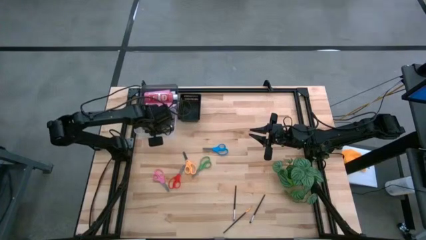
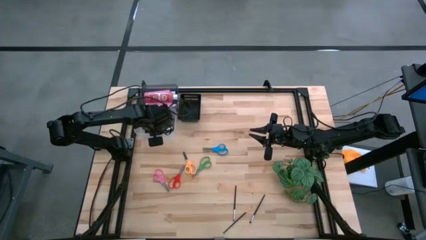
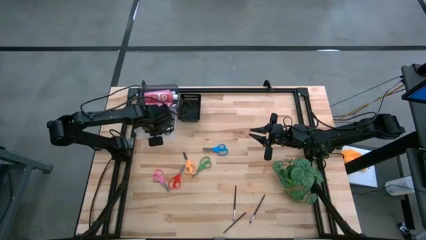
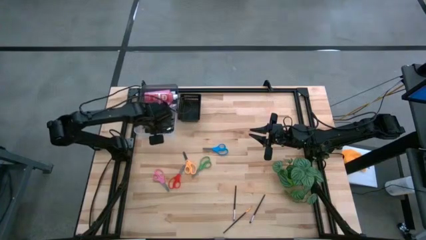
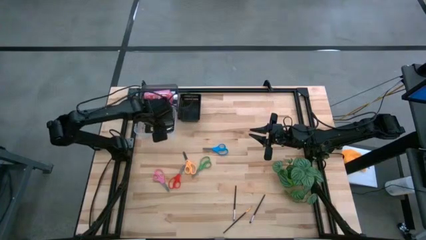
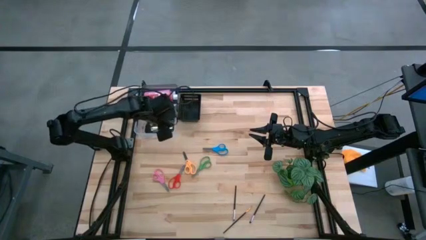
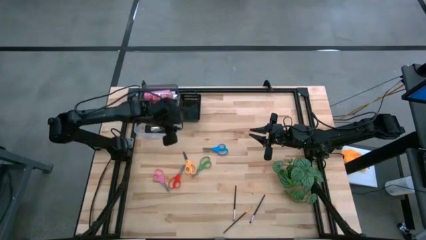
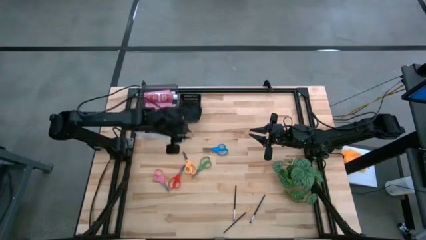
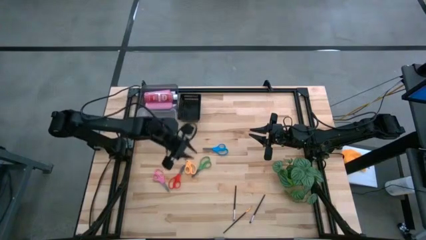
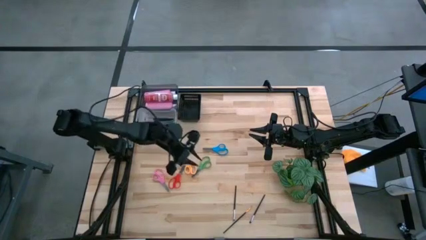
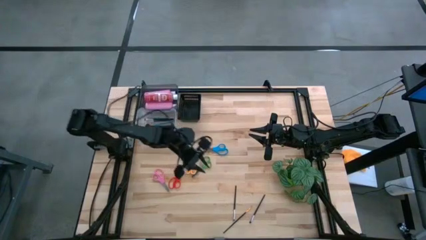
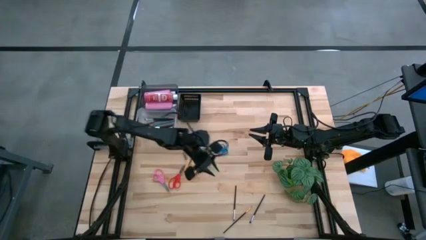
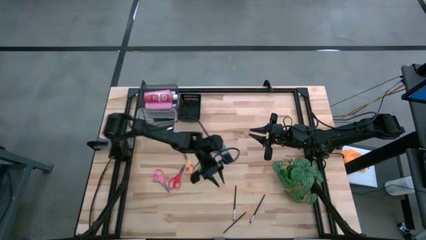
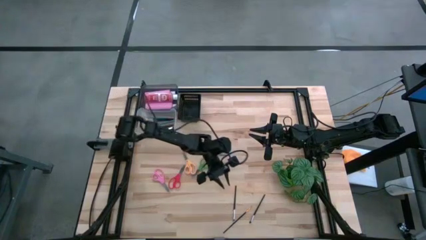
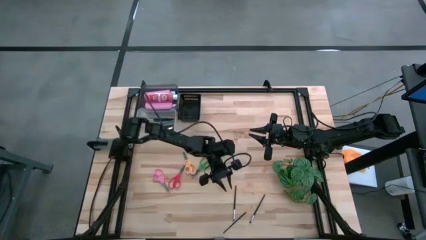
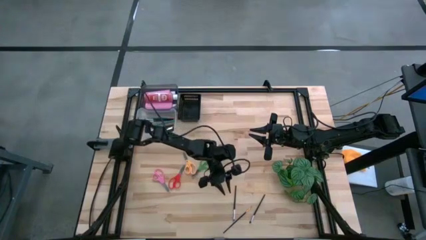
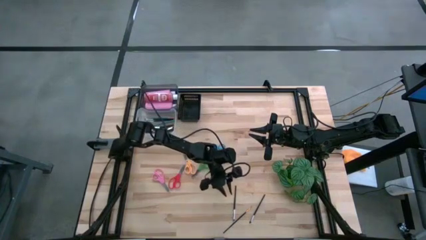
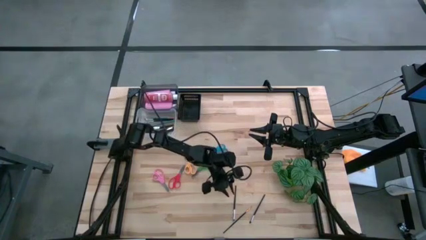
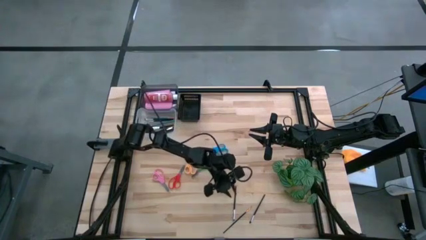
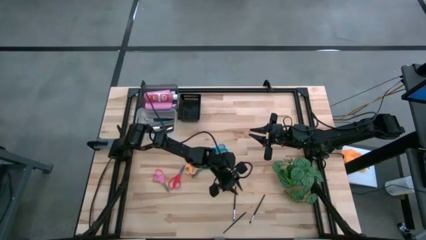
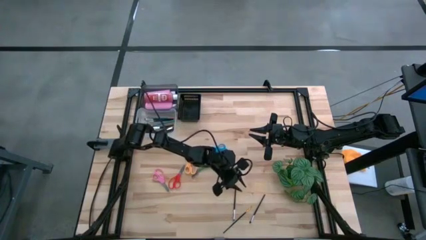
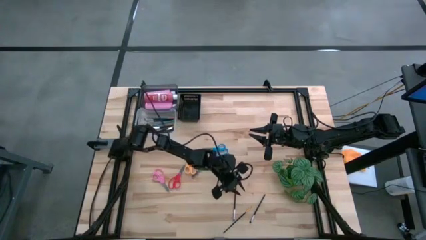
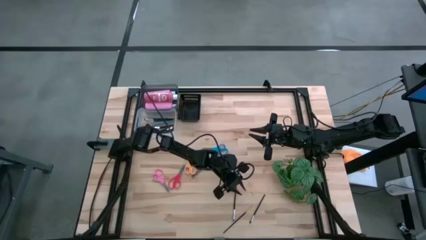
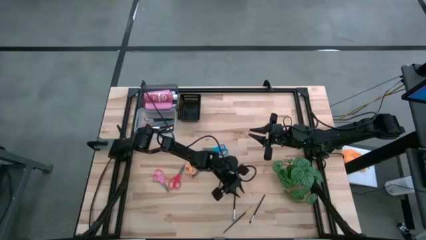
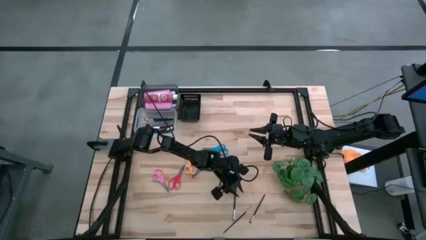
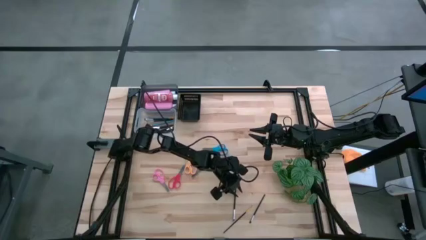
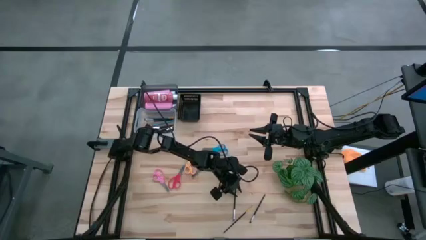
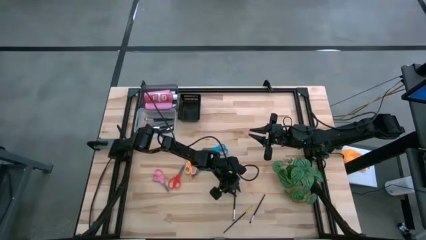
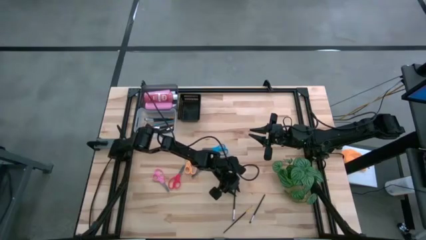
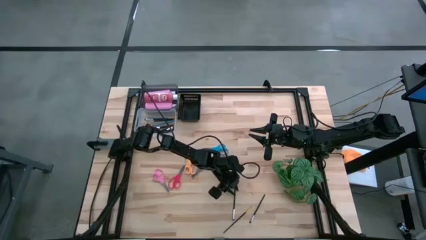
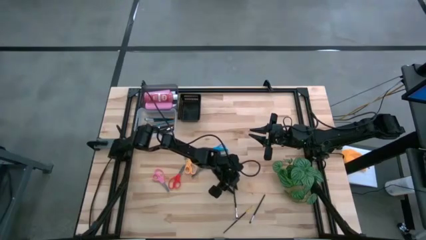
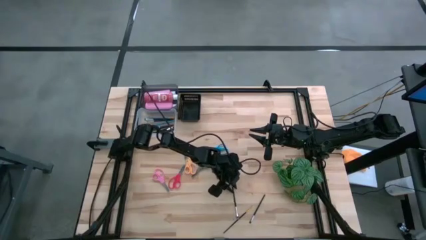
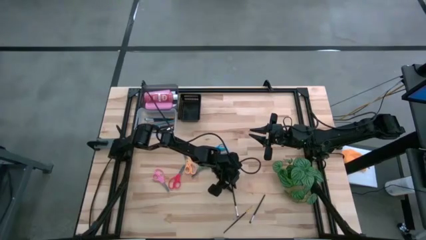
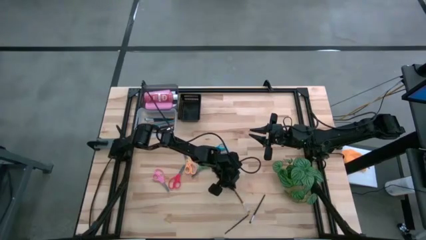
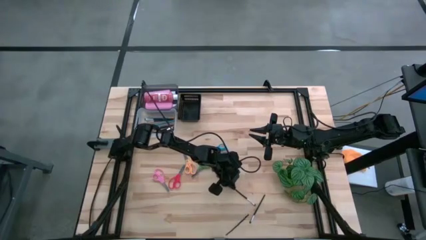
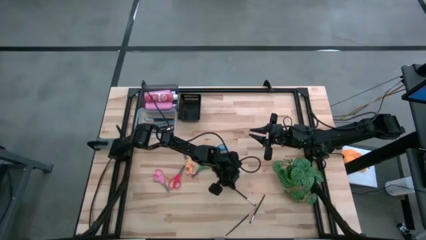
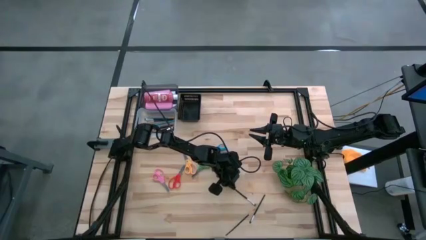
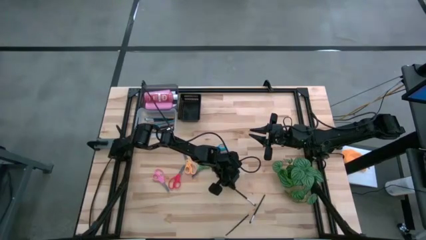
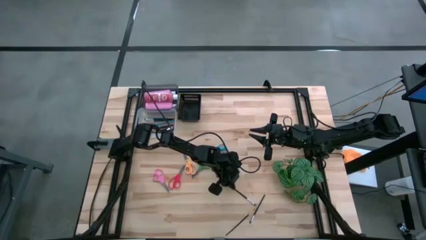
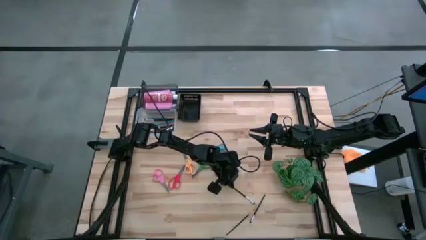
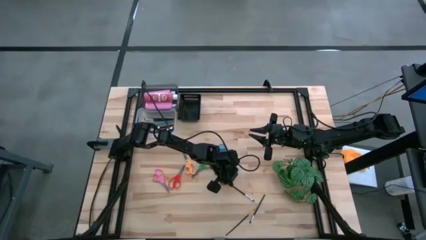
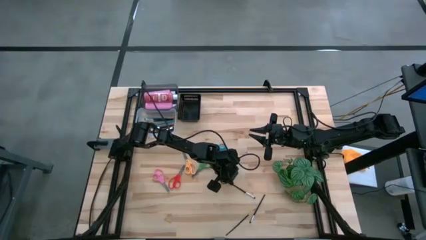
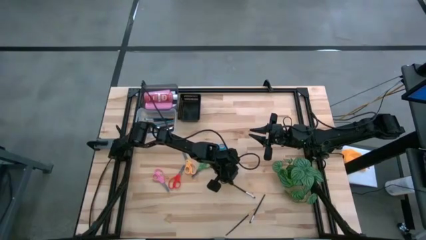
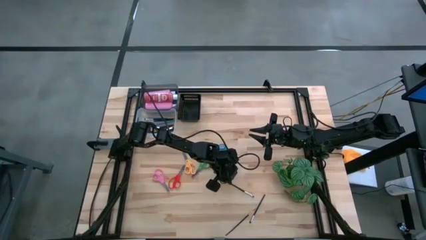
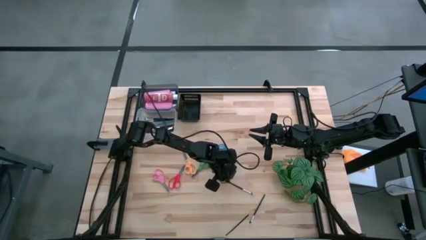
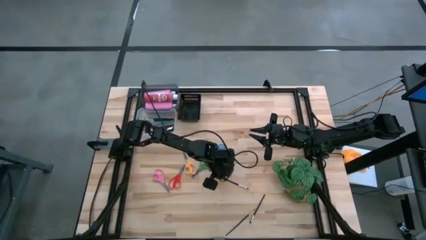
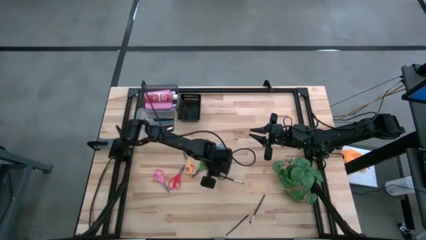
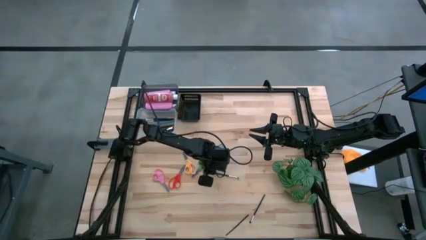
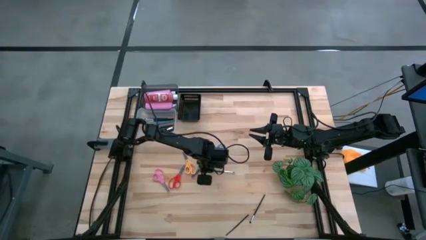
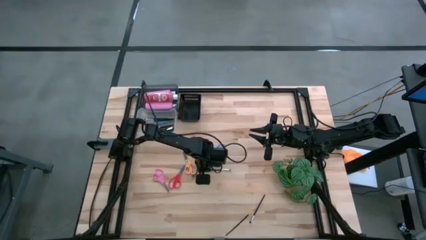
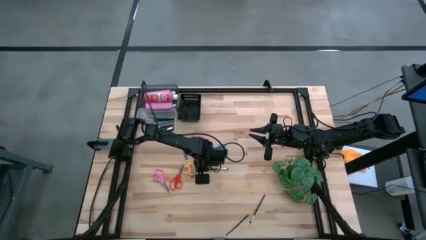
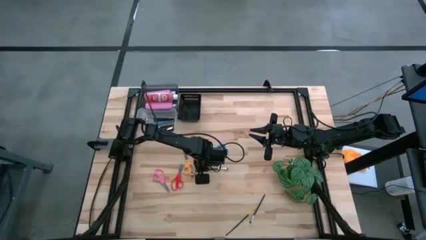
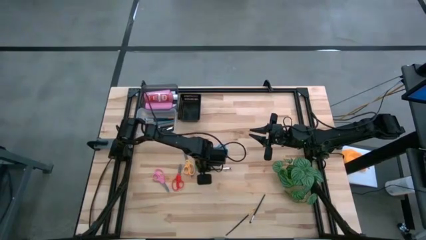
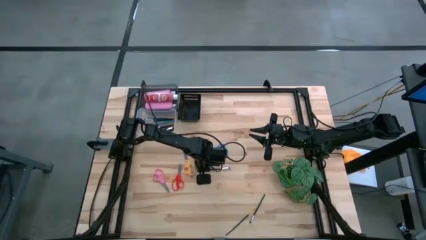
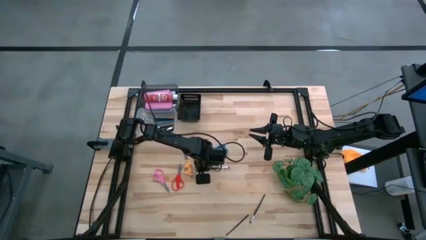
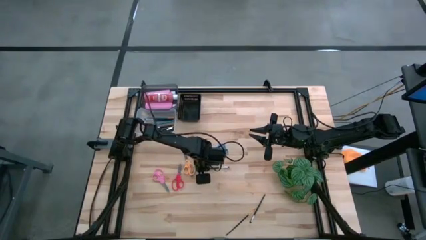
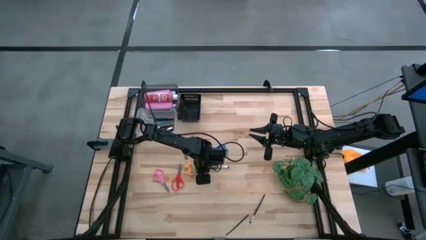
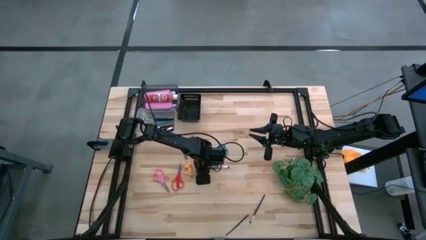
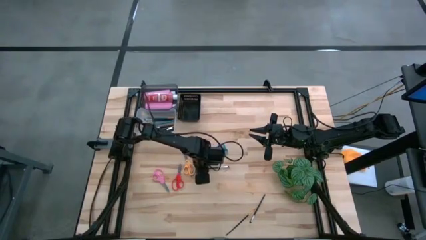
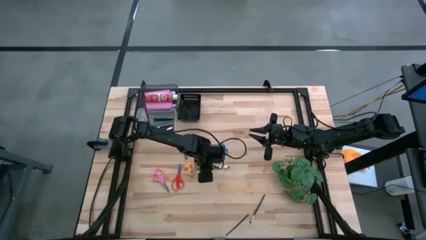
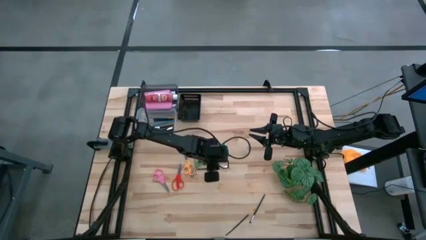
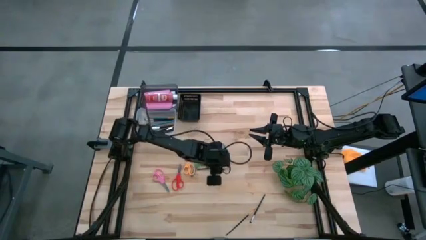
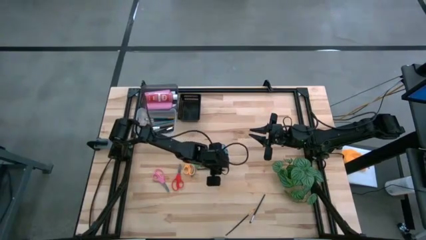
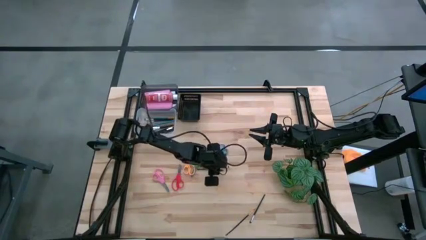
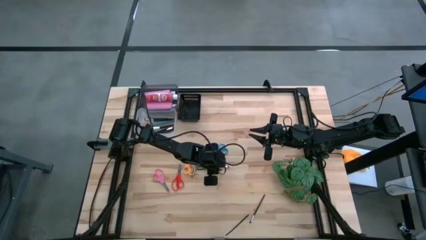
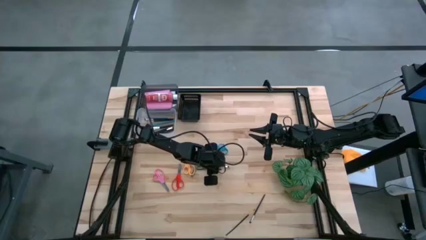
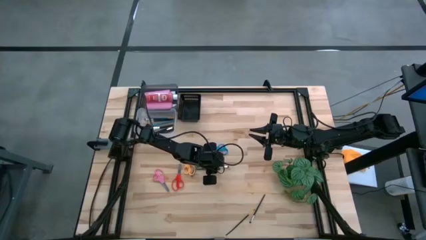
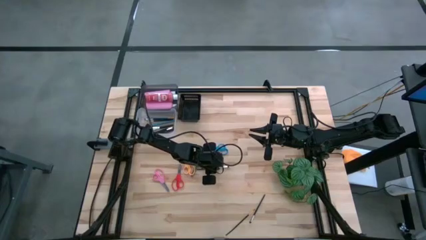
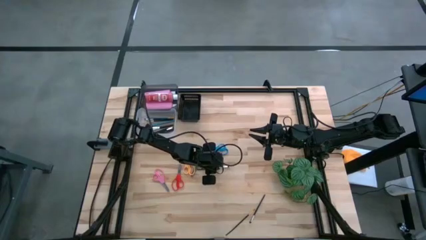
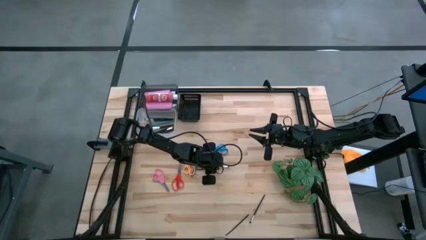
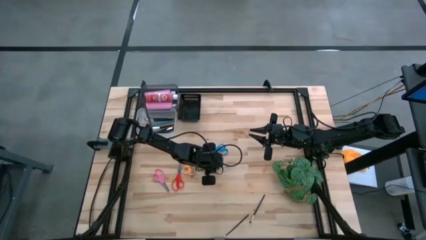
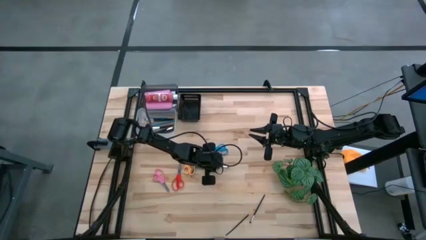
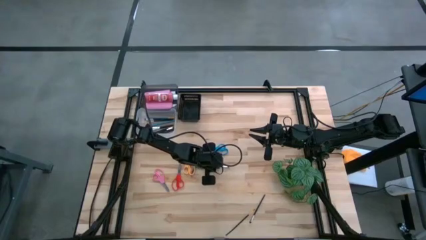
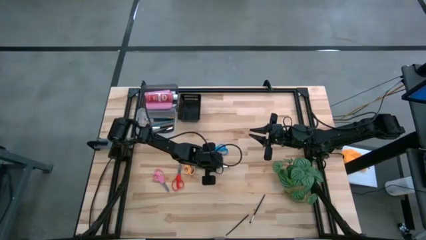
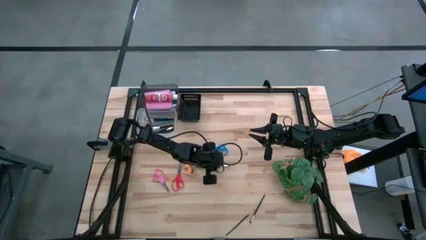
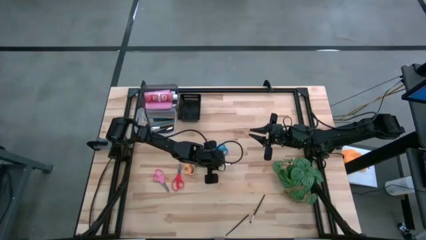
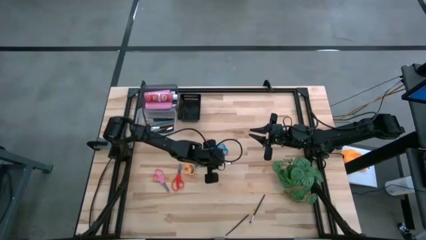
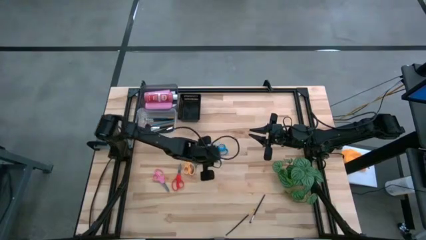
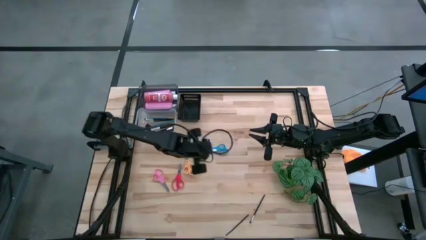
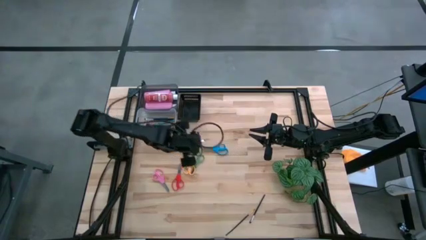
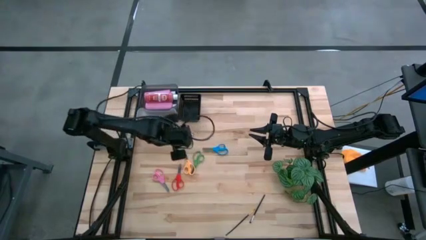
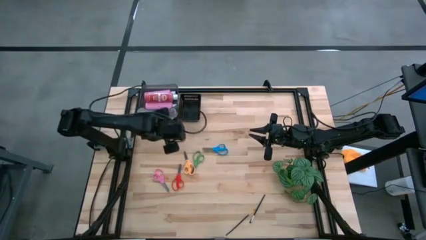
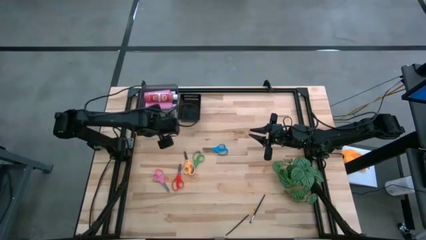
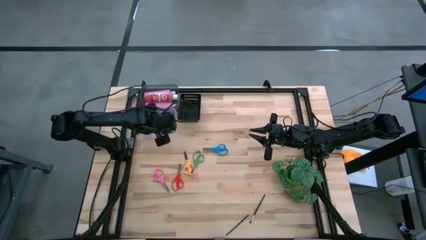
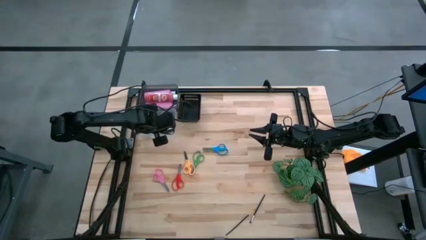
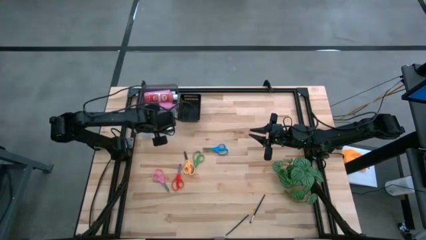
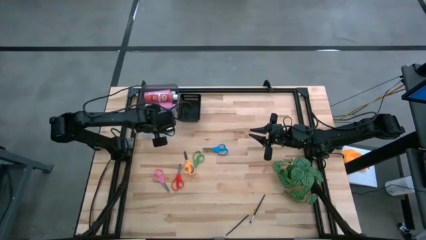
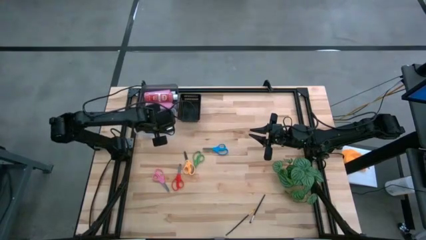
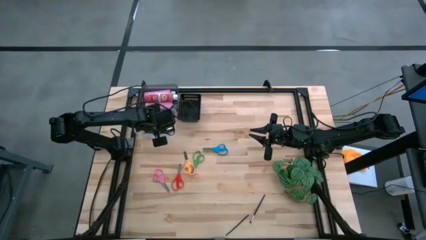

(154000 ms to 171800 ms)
Task: Pick & Place Paint Supplies
Put the black paint brush into the transparent bin
